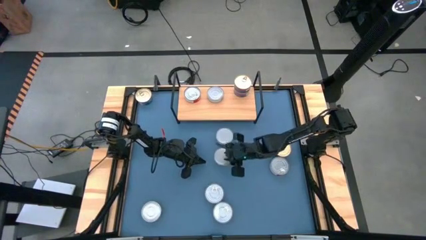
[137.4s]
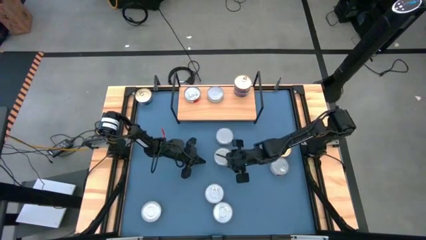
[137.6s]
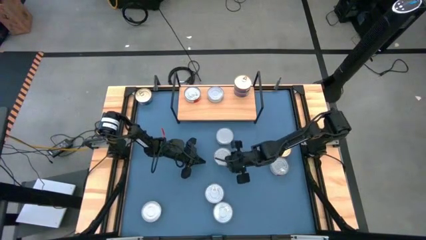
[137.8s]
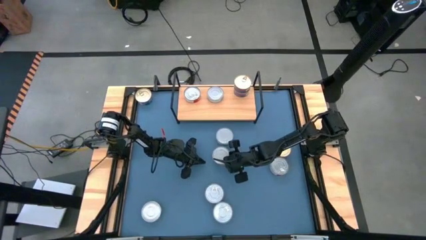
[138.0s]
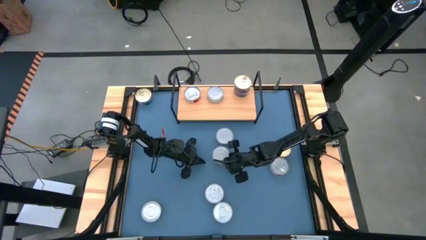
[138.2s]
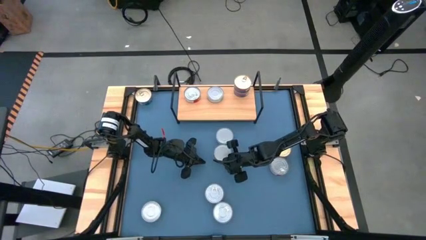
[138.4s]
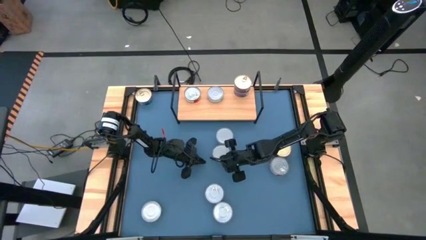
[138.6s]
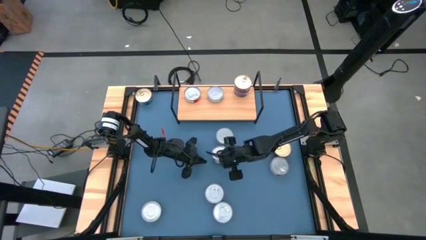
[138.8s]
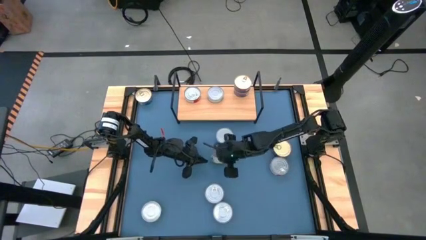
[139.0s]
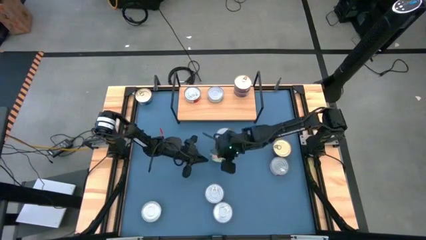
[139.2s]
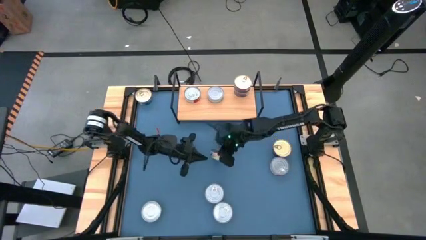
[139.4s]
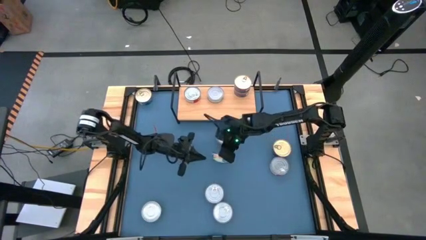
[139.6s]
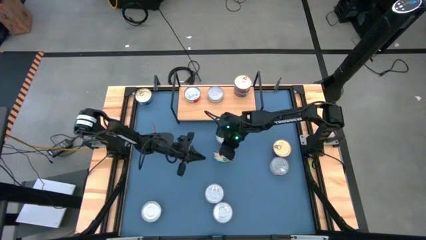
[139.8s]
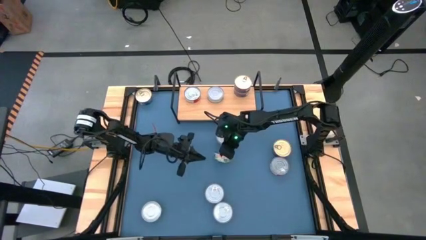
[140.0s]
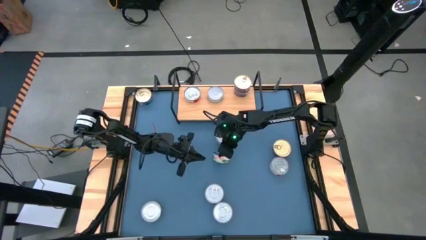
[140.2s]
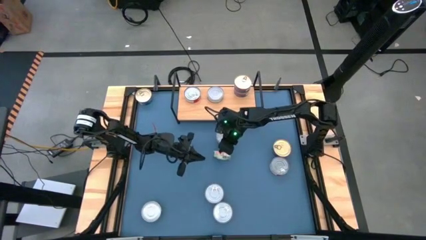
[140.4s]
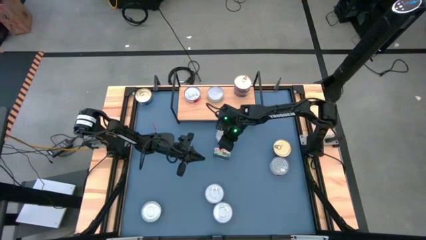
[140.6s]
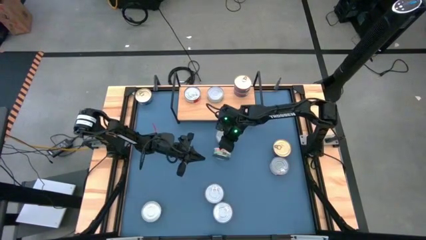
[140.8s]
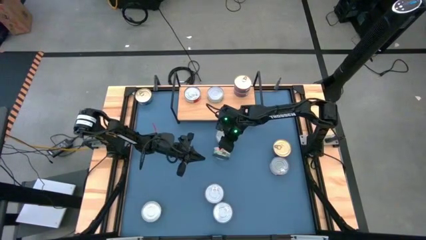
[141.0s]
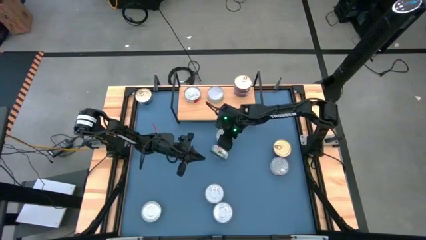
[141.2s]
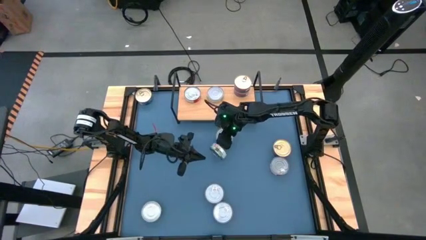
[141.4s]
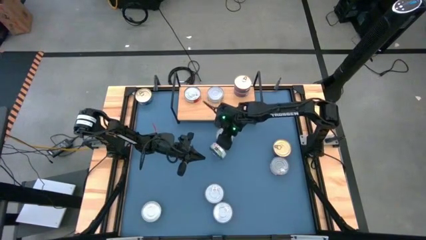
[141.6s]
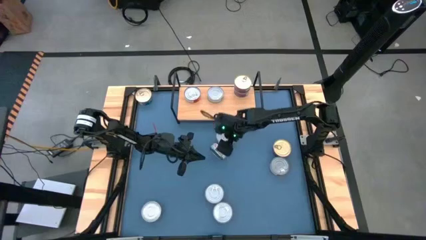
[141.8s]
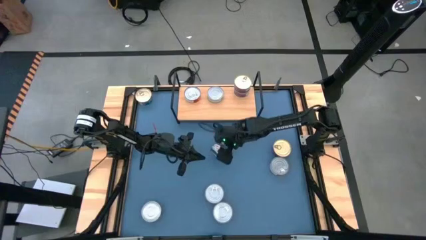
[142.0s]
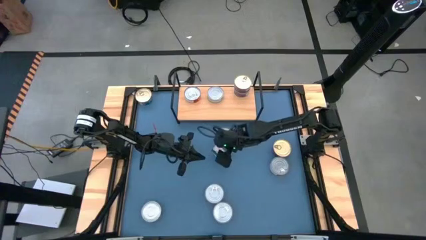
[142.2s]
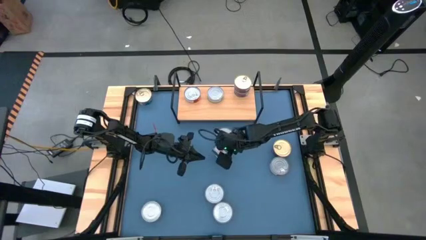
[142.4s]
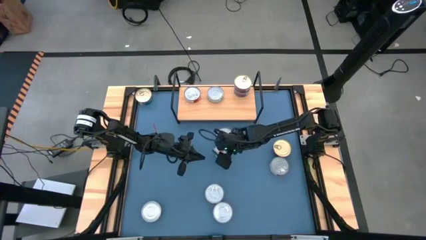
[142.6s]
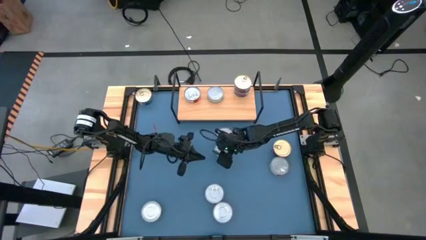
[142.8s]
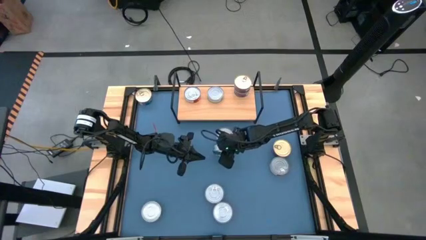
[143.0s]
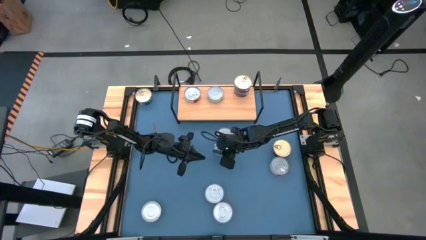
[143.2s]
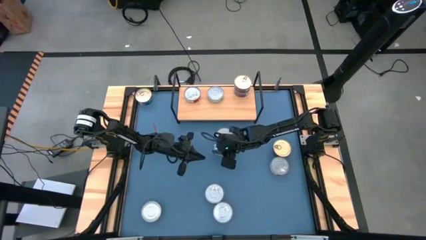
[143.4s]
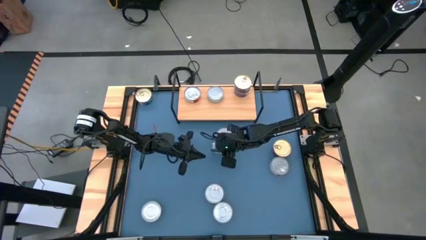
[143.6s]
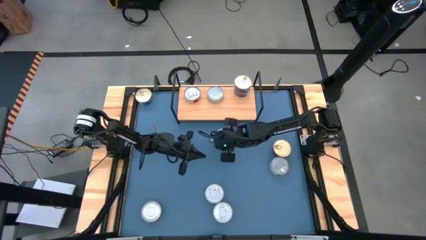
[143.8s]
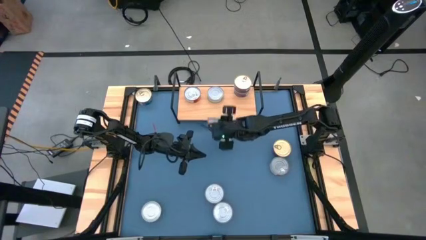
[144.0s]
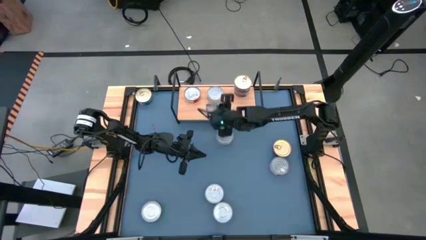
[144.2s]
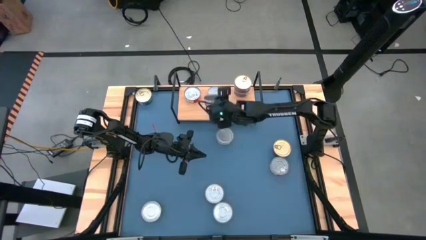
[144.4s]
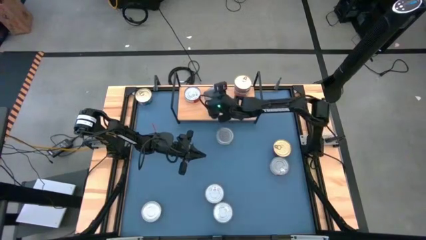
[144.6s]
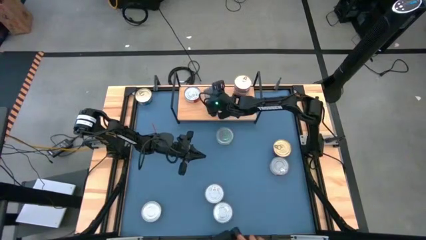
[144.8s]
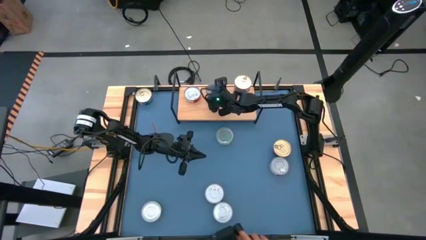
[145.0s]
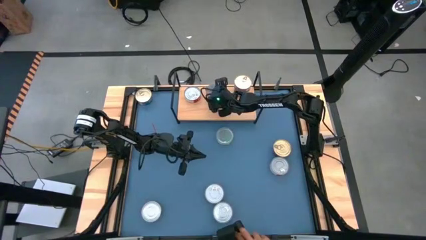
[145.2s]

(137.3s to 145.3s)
Task: Stack canned seafood by type on shelf
Stack the green tuna can on top of the green tuna can on the shelf

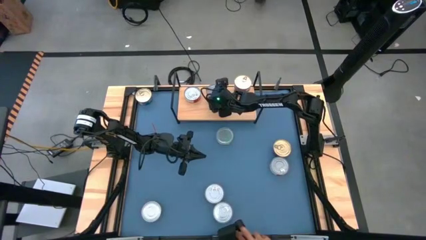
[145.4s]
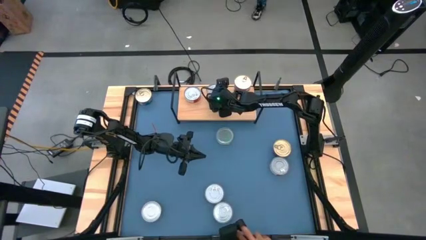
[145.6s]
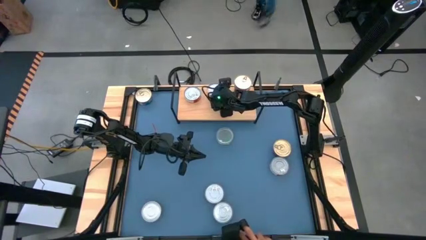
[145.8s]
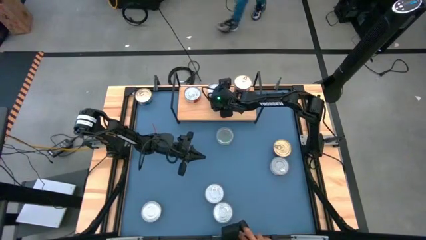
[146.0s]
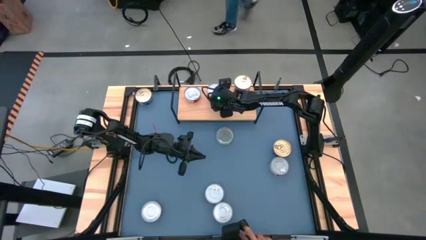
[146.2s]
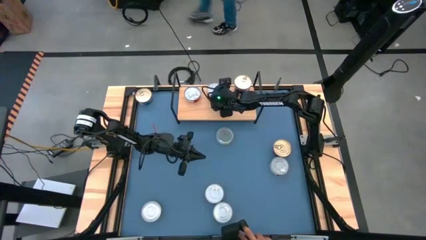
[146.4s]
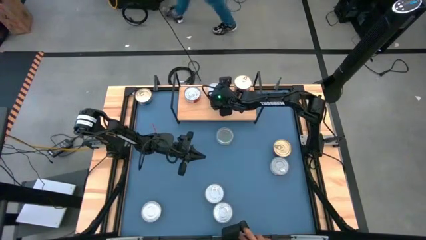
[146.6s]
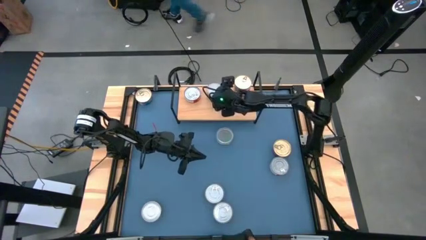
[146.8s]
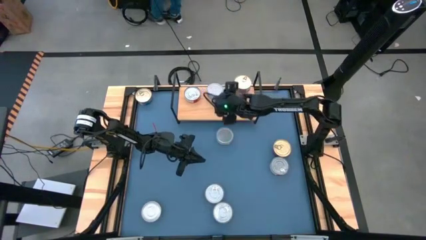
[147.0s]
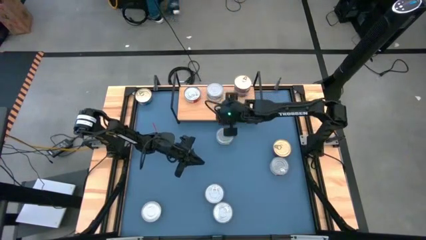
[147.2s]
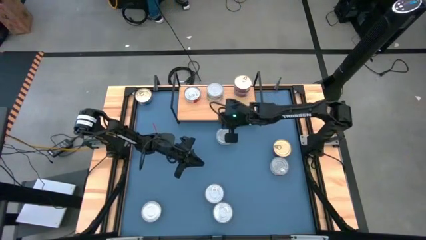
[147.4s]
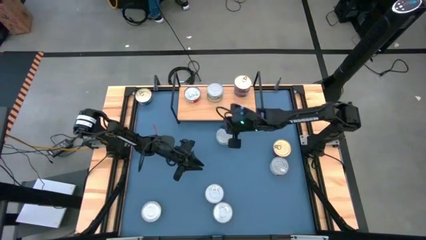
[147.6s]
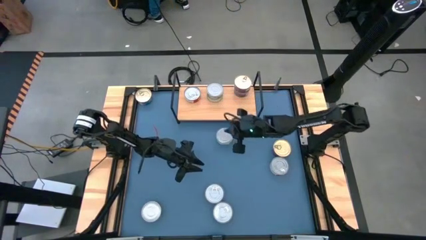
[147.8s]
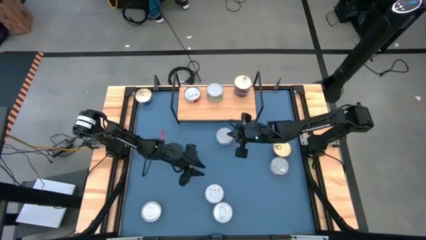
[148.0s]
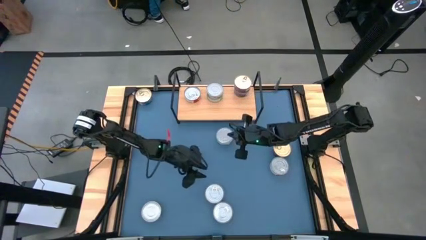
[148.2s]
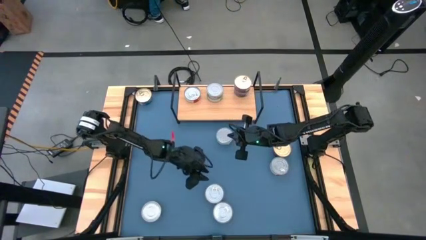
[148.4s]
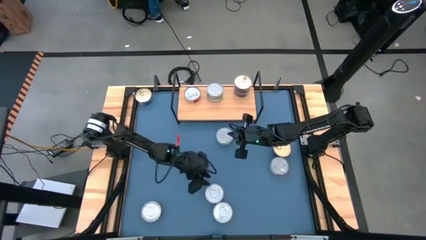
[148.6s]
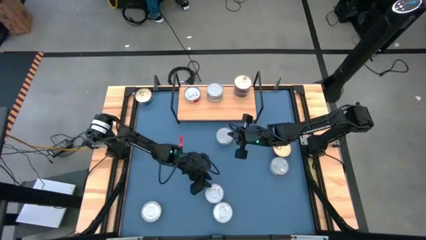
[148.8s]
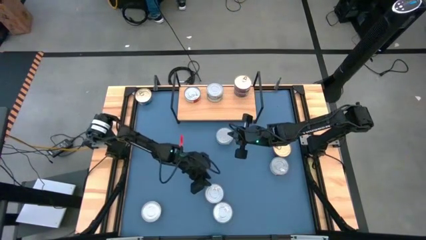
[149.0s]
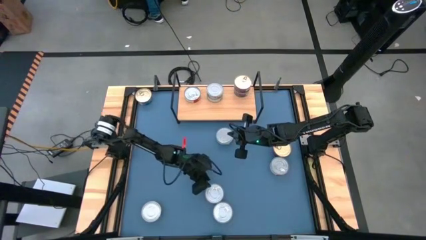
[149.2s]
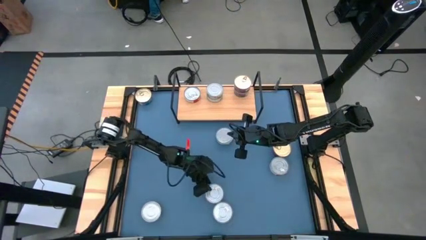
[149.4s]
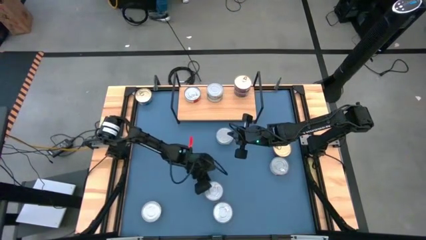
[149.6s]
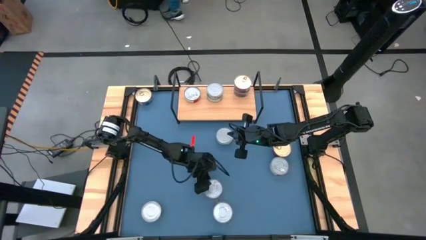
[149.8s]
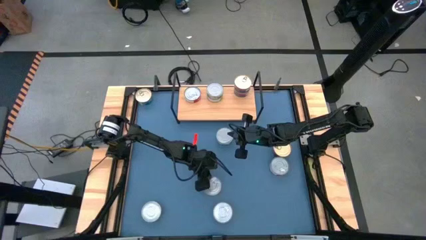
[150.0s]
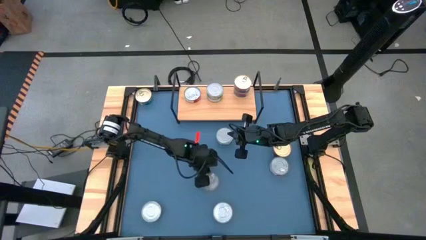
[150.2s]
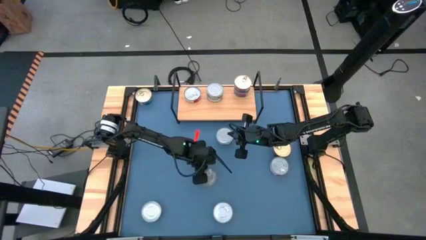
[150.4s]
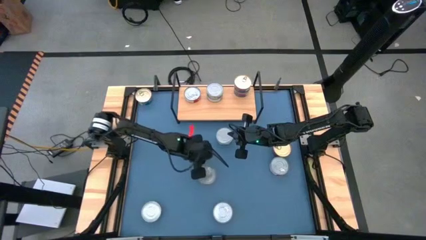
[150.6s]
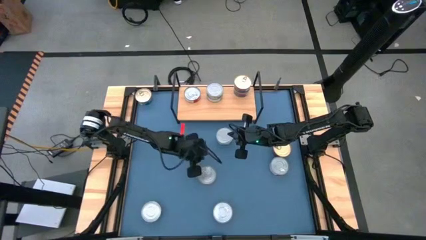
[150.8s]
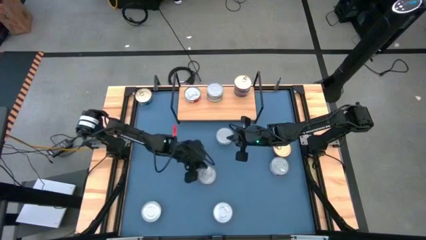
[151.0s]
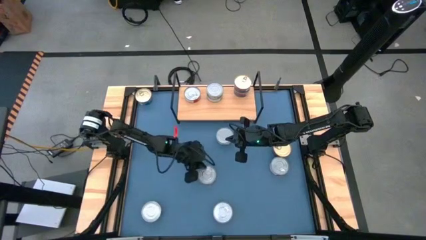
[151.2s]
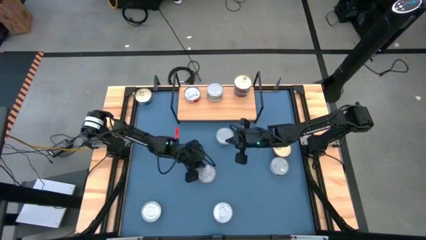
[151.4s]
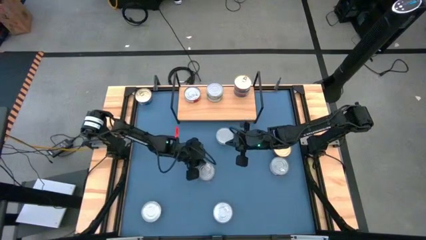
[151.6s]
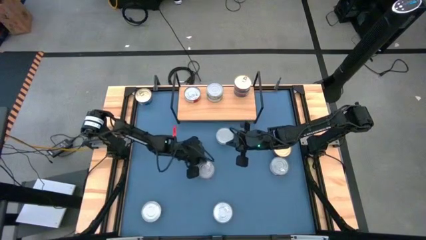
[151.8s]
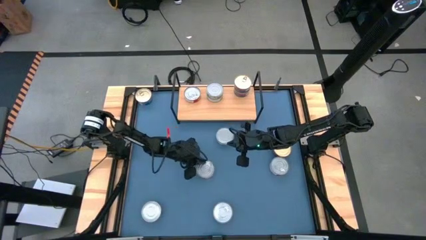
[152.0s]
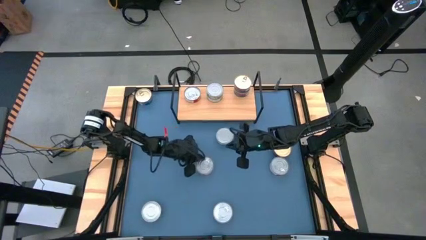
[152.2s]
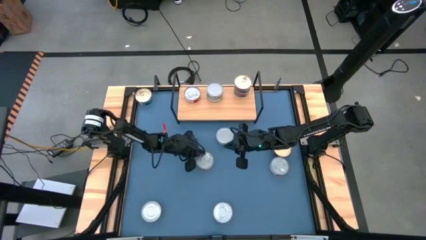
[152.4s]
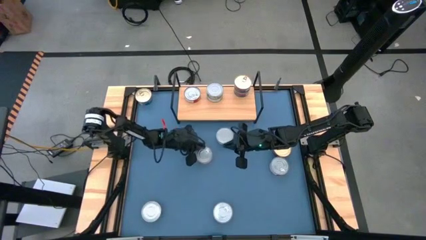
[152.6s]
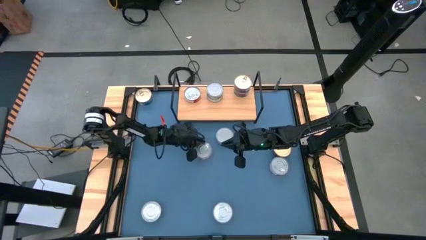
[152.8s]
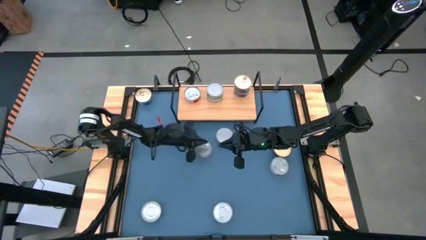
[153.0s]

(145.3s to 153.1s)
Stack the red tuna can on top of the red tuna can on the shelf
